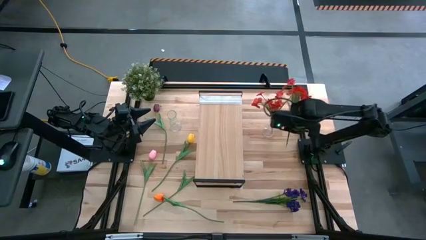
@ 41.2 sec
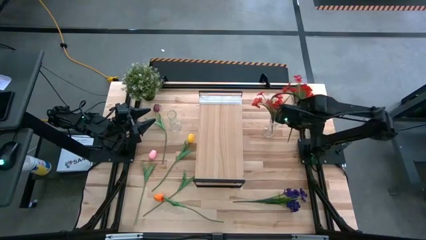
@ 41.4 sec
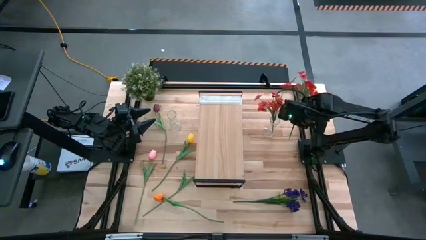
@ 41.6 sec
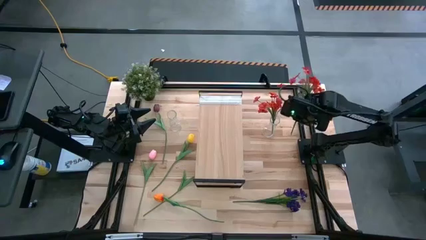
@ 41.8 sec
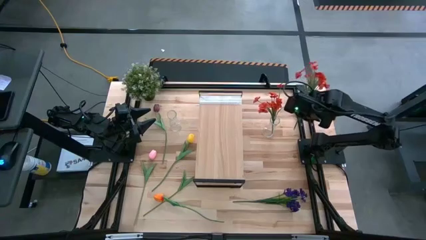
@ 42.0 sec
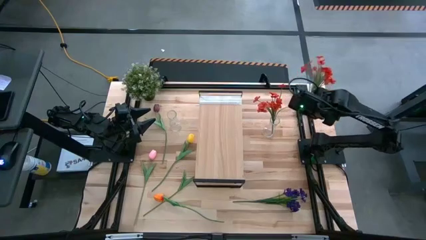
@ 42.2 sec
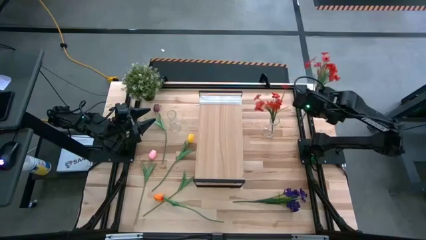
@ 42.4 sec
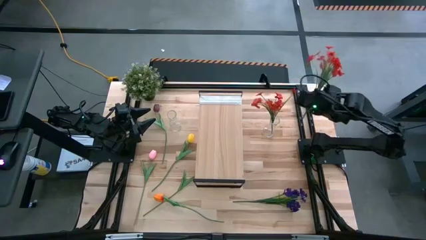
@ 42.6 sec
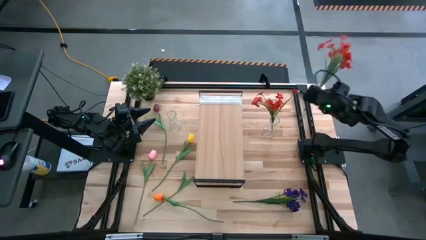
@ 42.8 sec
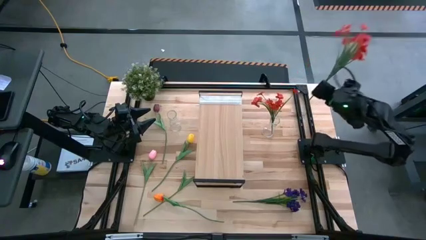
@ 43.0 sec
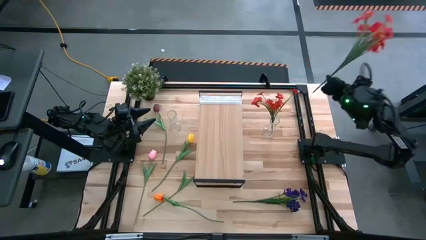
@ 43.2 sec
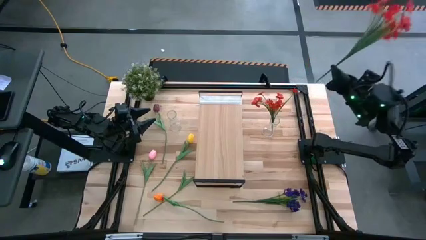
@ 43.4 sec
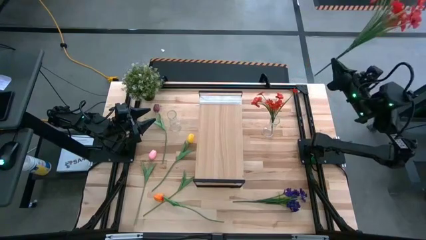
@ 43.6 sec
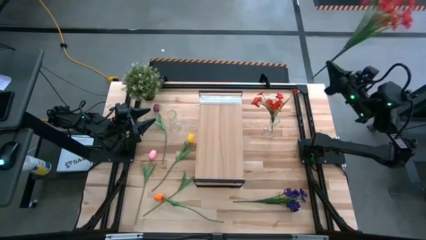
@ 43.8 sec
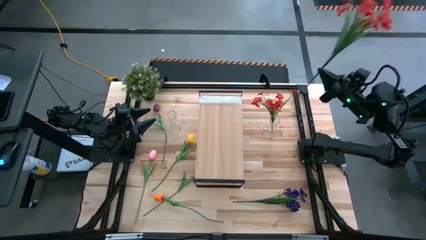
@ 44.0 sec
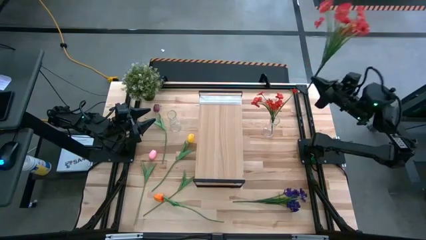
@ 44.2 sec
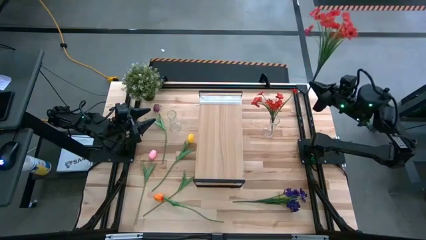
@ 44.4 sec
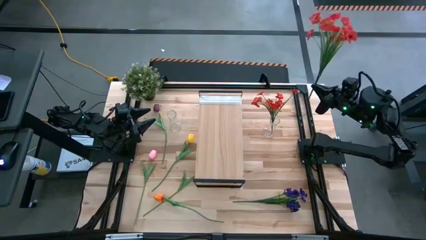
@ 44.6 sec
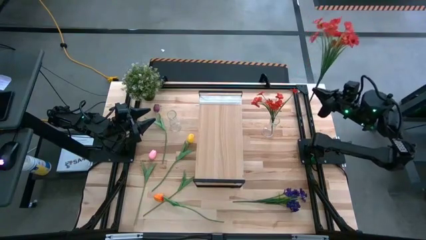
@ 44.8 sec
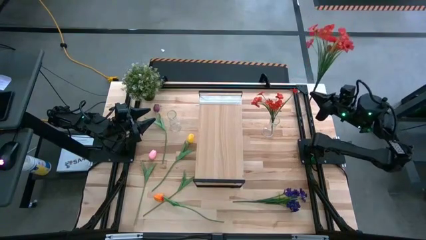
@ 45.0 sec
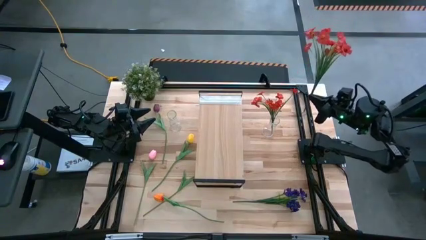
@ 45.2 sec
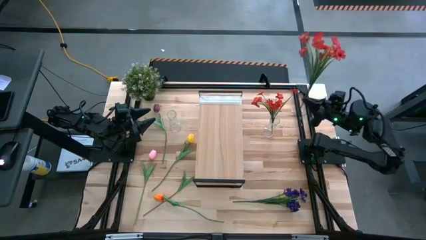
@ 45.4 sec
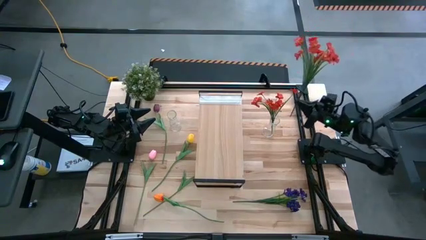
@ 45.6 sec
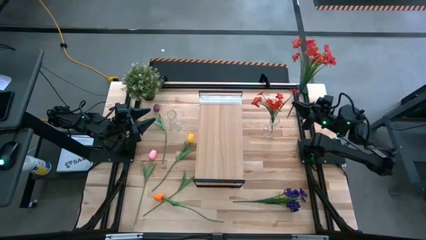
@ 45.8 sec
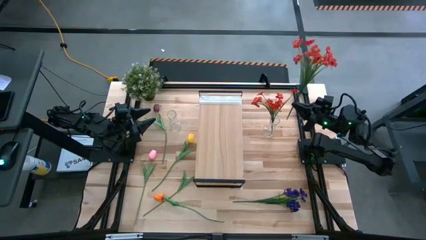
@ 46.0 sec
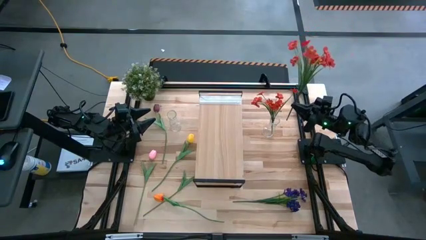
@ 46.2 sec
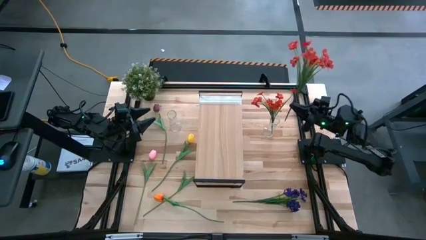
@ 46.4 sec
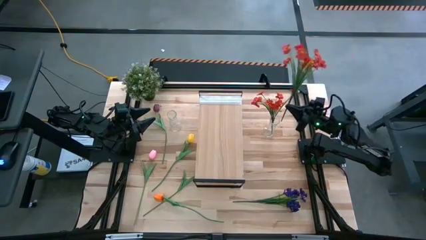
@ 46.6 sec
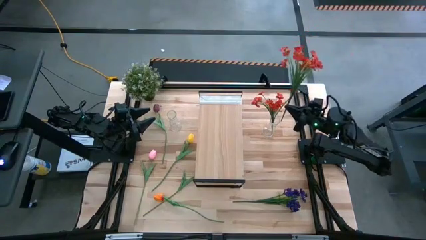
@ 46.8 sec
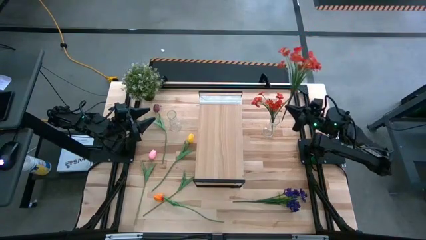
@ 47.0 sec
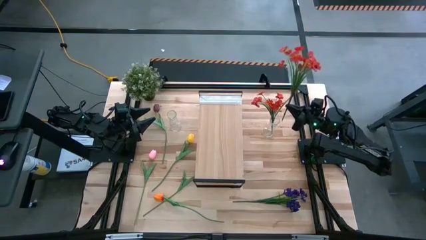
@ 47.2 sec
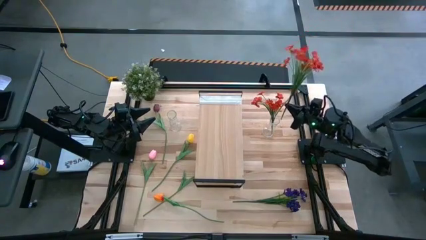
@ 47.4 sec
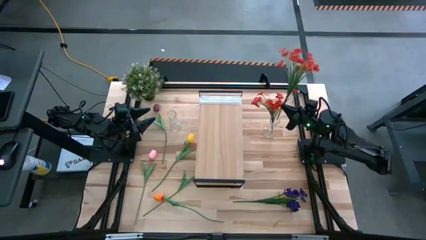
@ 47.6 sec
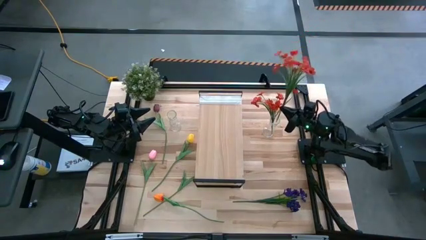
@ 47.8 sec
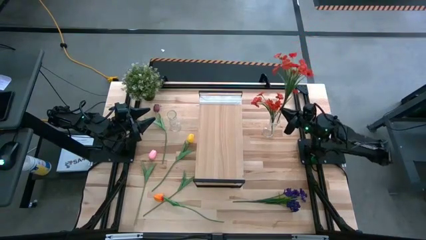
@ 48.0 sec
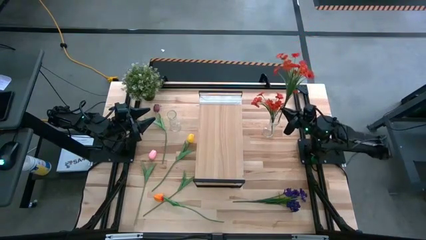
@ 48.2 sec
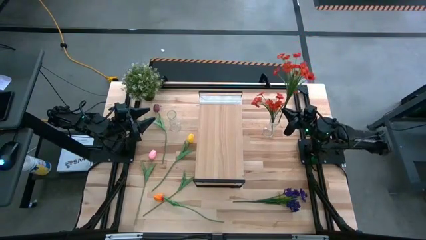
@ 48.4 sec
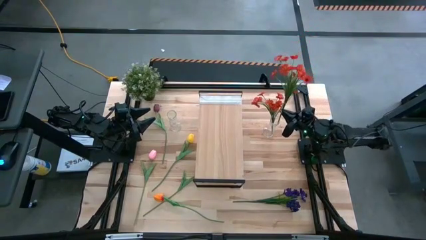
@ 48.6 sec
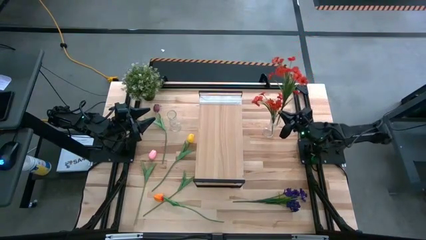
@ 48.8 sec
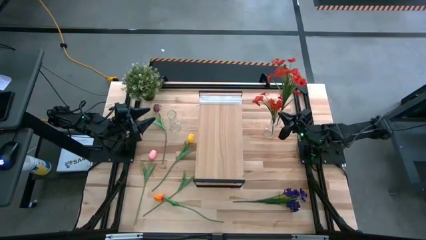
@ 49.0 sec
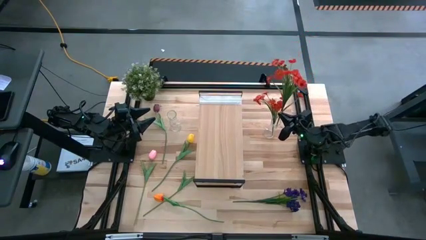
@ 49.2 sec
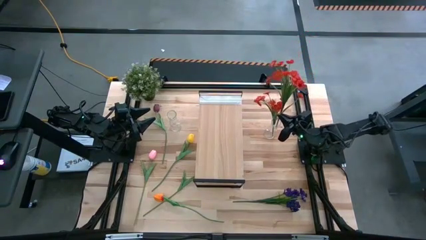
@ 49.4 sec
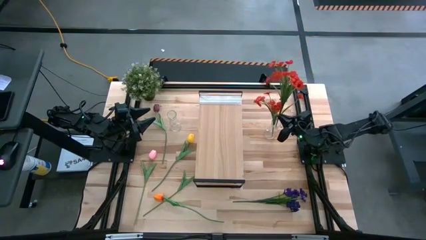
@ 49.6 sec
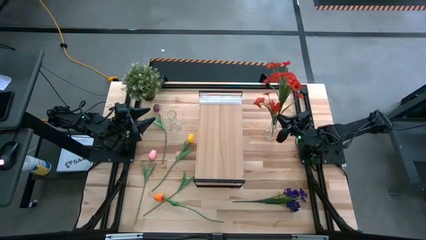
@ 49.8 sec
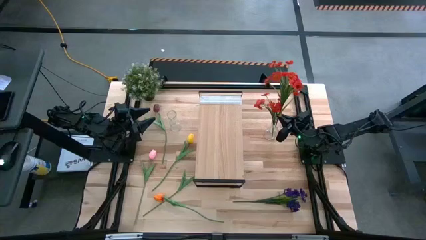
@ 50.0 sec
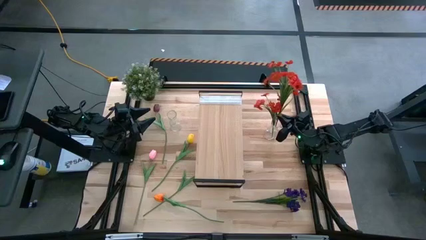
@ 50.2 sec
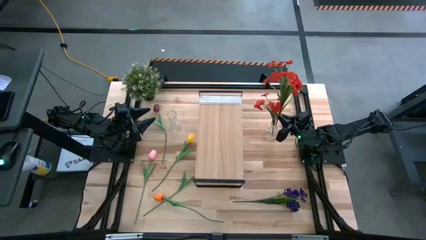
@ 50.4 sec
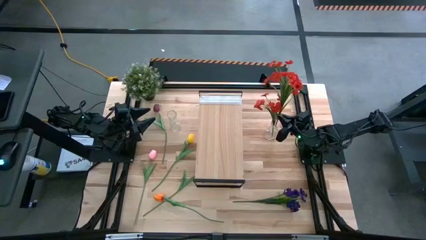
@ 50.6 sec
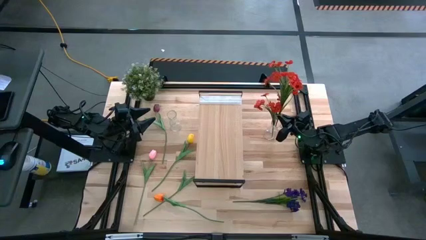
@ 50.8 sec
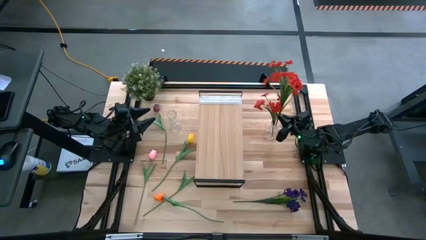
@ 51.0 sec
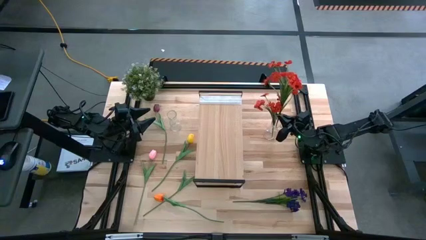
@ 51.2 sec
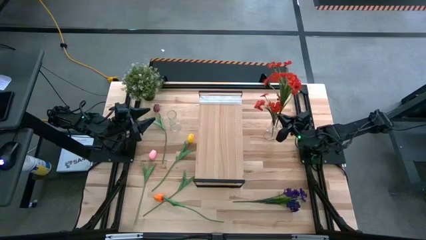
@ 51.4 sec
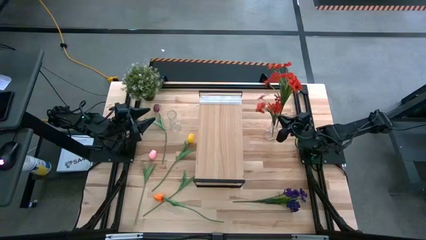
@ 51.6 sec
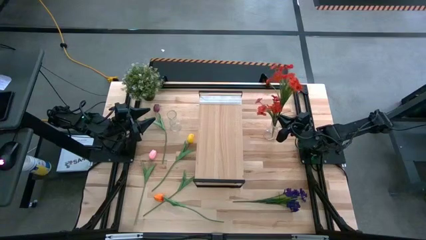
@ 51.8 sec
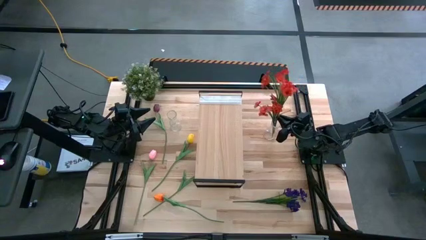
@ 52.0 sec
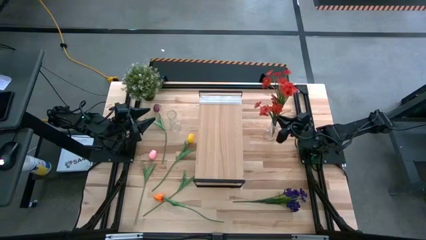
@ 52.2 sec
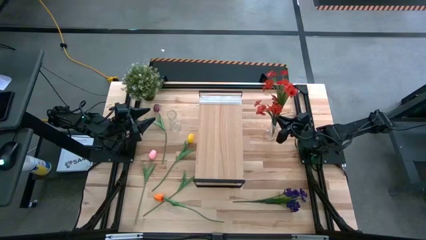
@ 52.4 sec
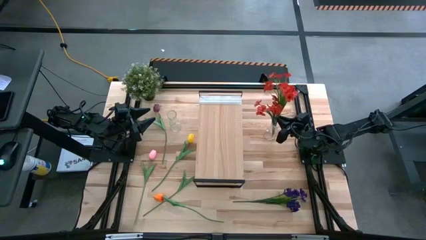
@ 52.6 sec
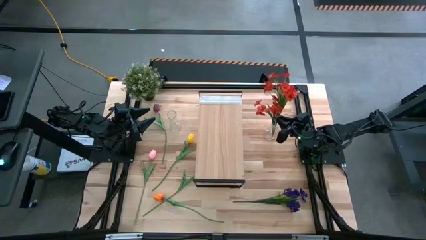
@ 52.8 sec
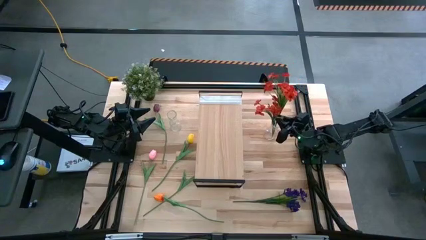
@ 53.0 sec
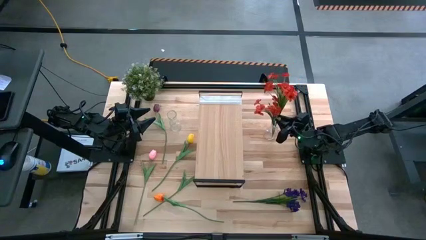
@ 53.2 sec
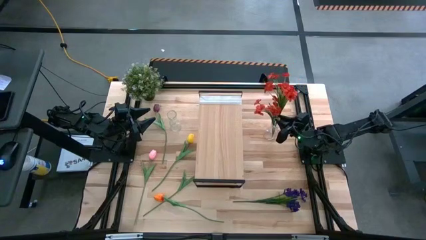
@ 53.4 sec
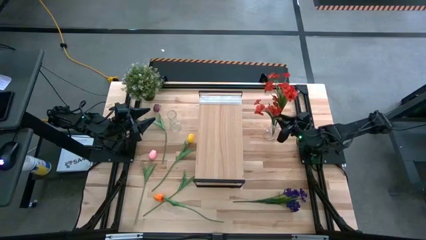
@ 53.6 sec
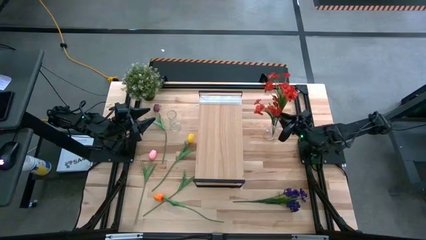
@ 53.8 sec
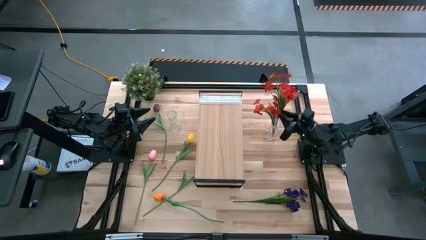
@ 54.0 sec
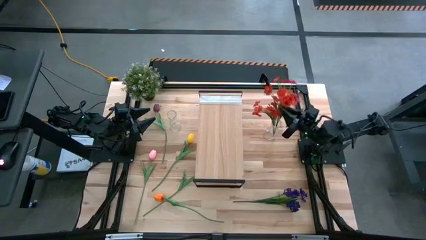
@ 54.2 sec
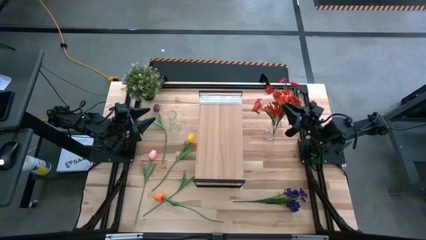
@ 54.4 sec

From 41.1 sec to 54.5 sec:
Task: Pick and place flowers into a vace then onto a shelf
Put the red flowers into the right transparent vase

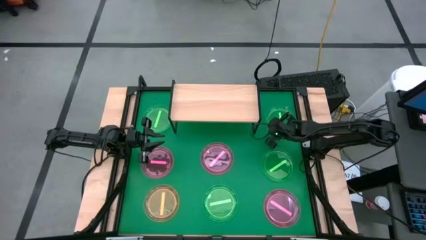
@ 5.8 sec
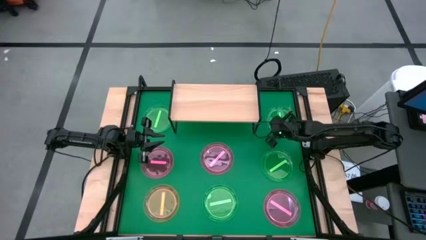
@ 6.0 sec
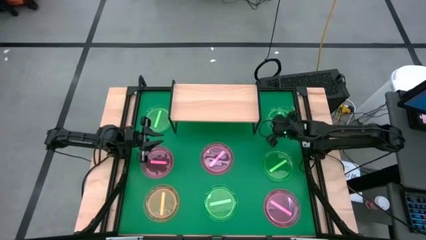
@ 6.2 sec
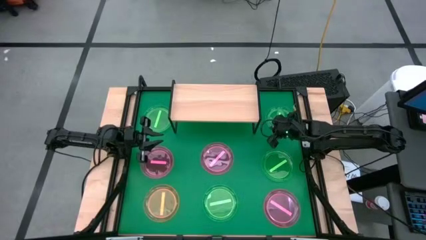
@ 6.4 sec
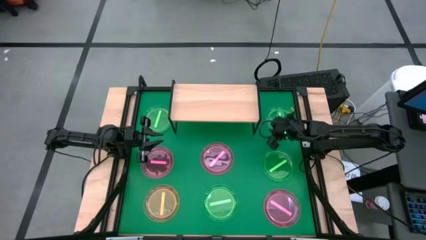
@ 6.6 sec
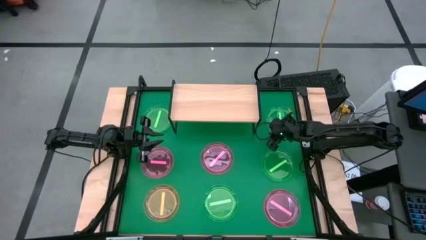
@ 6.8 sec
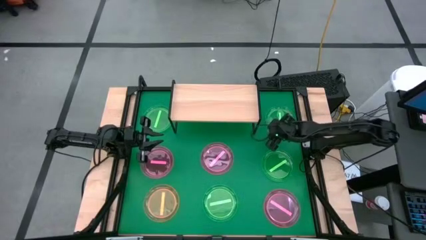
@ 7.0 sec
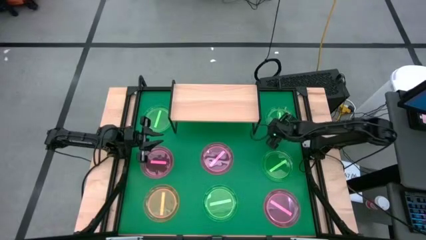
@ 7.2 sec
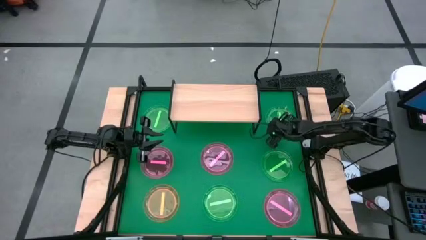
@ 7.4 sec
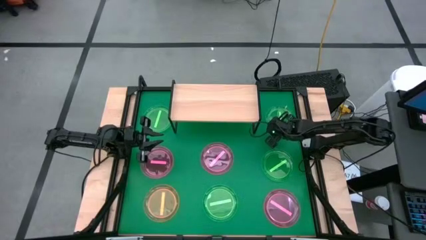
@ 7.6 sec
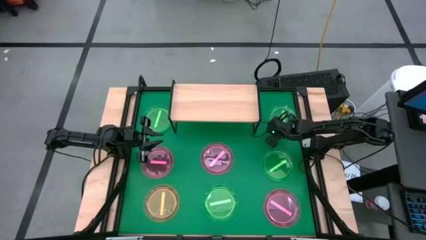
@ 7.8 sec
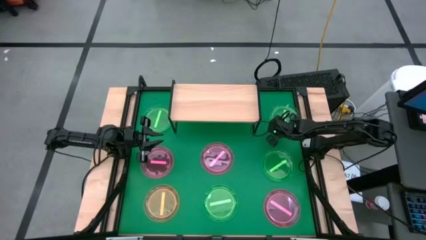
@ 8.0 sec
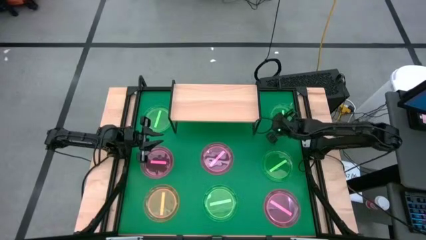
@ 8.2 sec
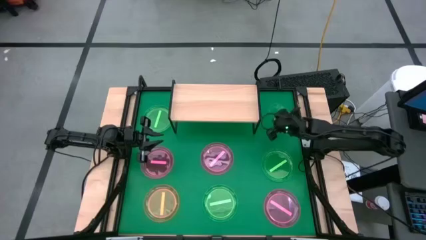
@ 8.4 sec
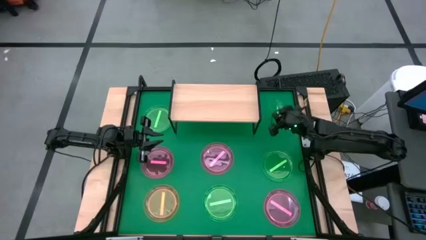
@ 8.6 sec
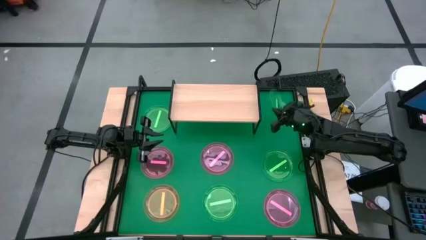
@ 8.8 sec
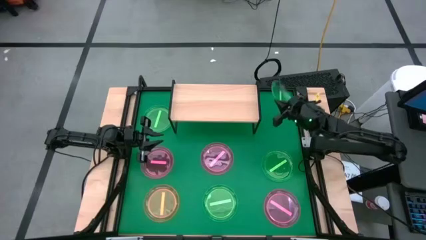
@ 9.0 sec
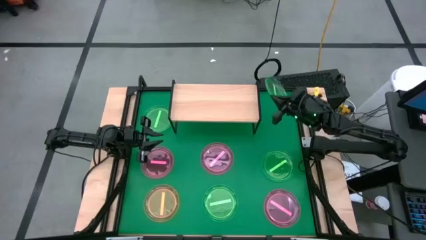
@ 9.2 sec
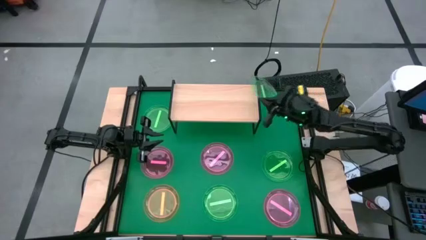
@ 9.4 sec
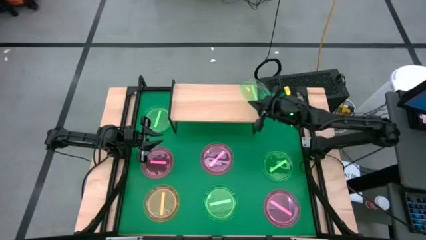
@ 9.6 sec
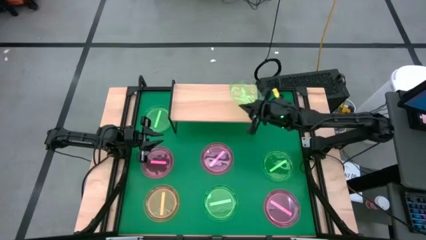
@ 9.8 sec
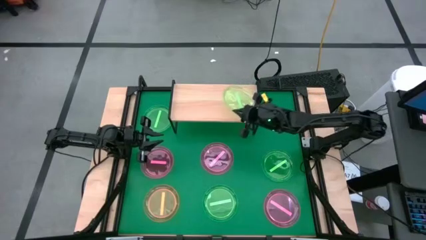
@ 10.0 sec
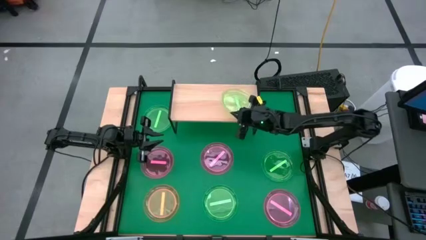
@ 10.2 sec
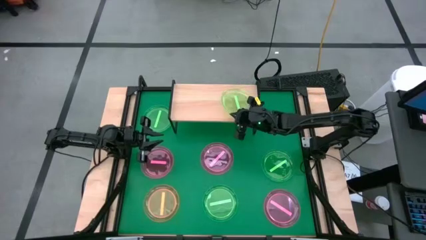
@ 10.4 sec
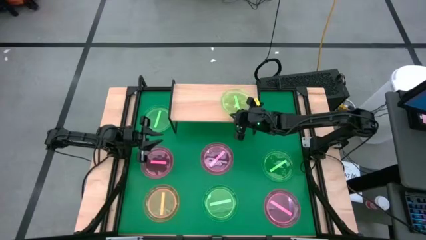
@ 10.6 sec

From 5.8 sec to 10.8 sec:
Task: Place and stack plates onto a shelf
Put the green plate on the shelf
